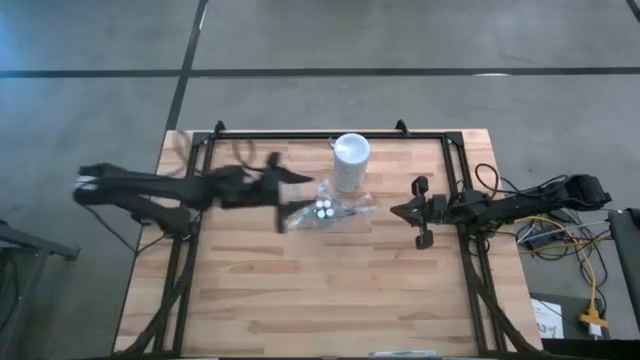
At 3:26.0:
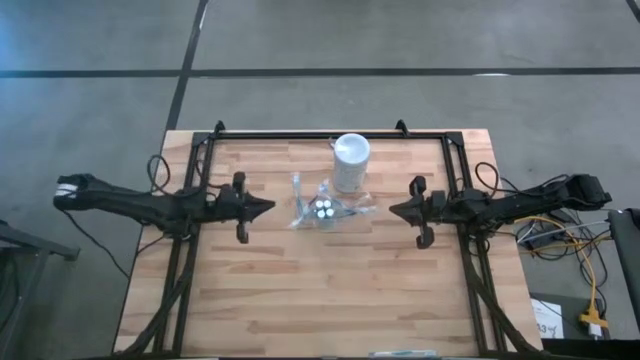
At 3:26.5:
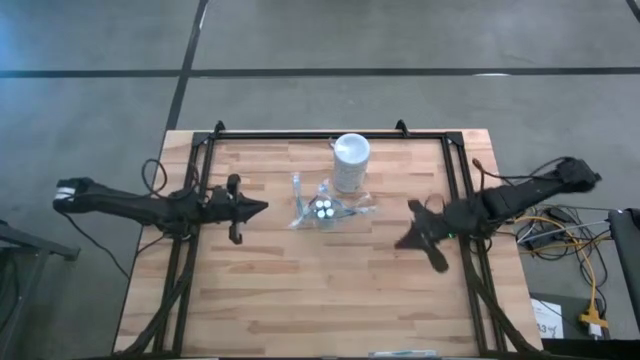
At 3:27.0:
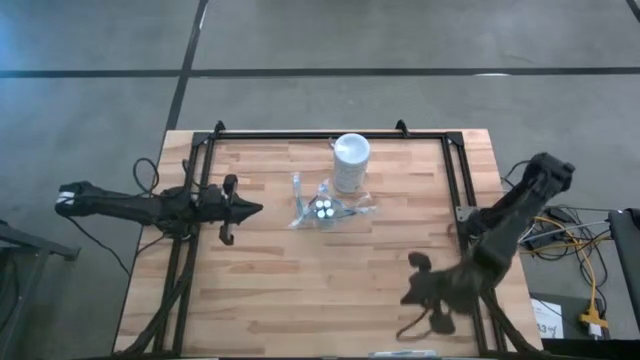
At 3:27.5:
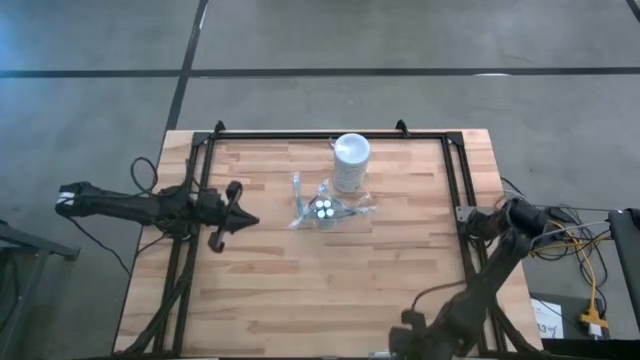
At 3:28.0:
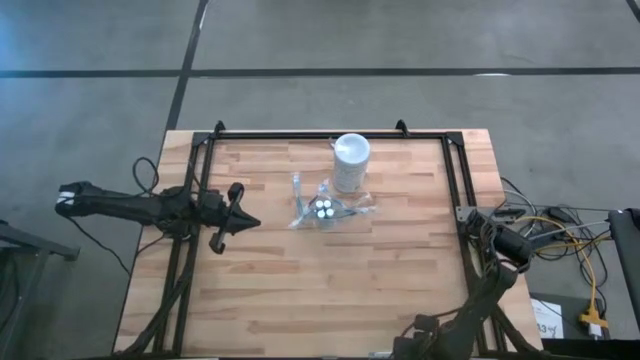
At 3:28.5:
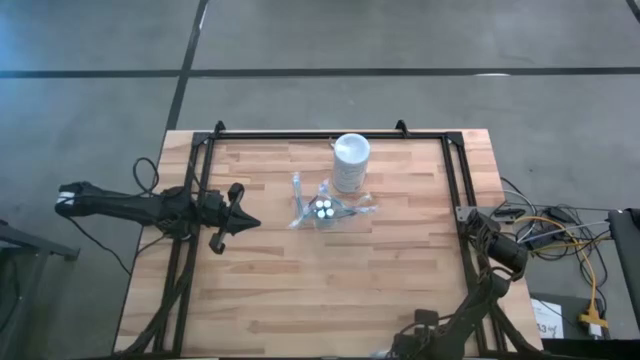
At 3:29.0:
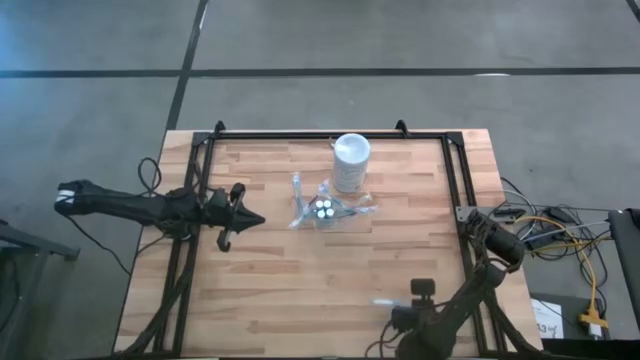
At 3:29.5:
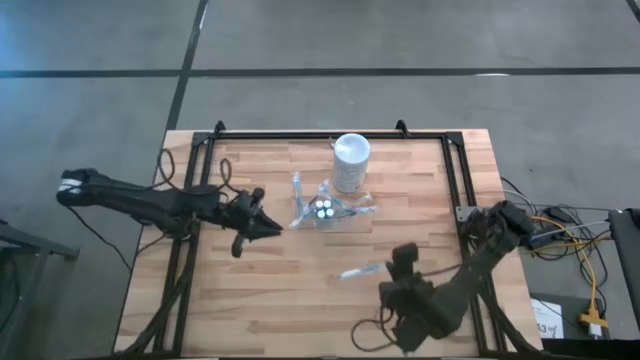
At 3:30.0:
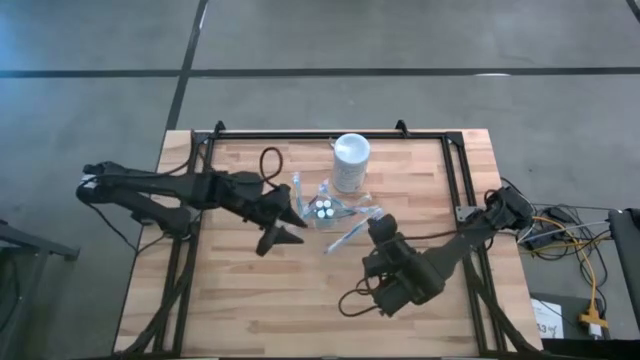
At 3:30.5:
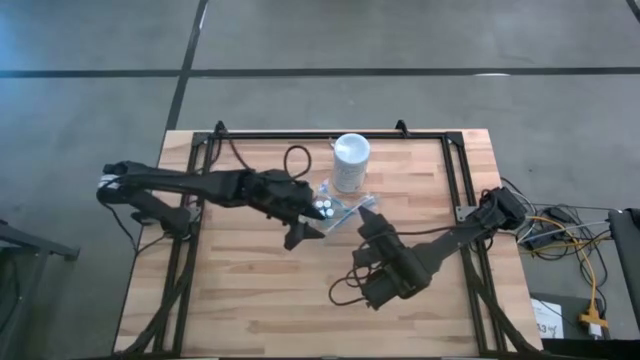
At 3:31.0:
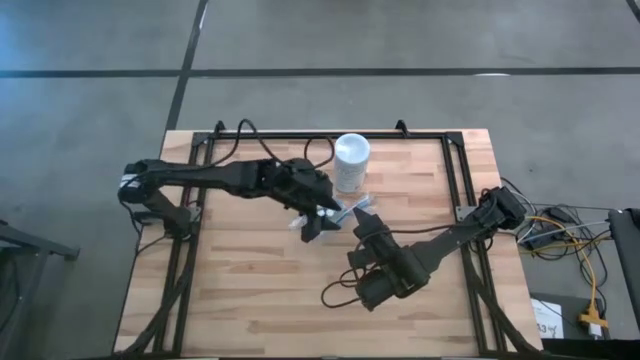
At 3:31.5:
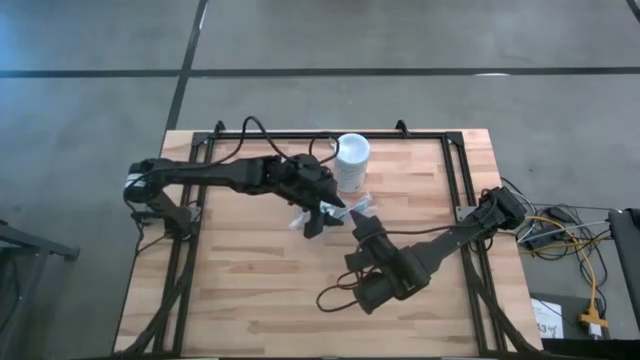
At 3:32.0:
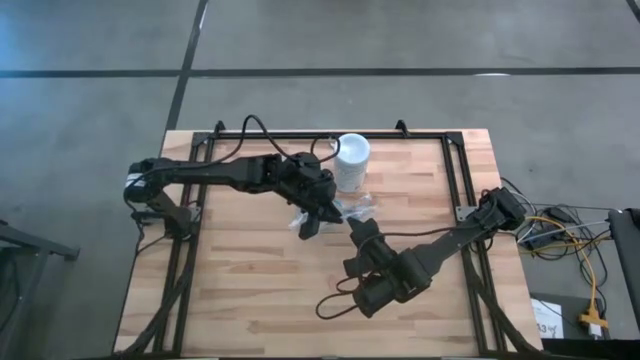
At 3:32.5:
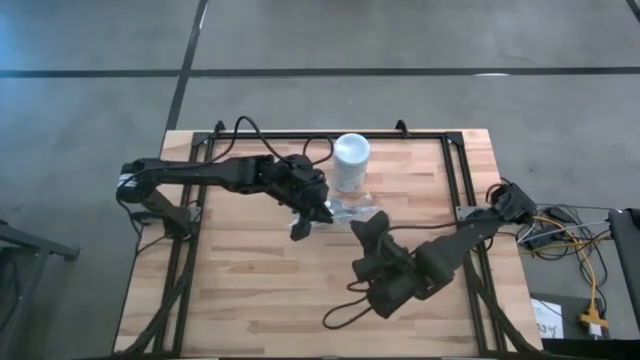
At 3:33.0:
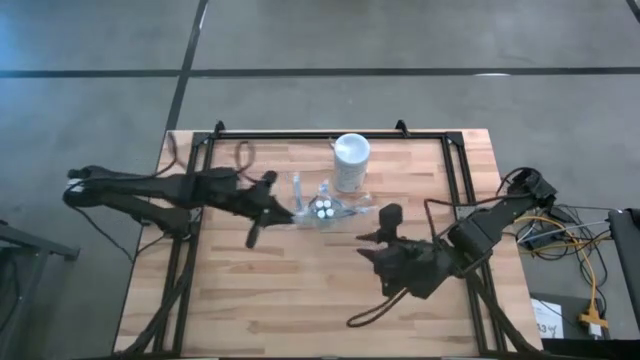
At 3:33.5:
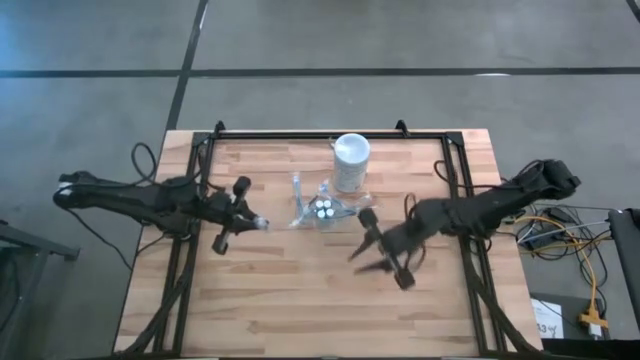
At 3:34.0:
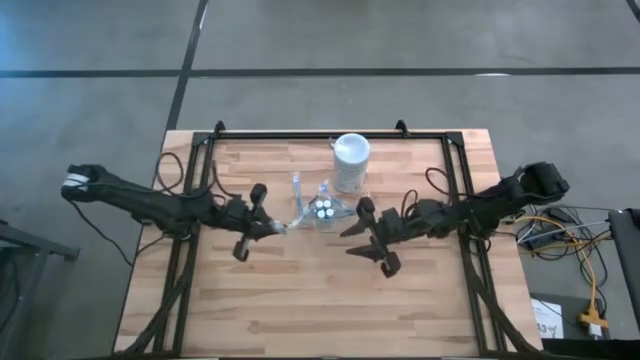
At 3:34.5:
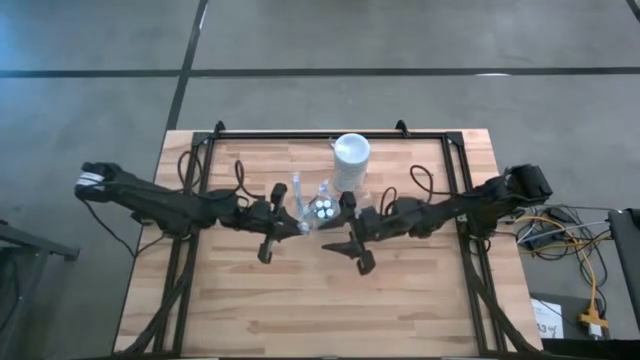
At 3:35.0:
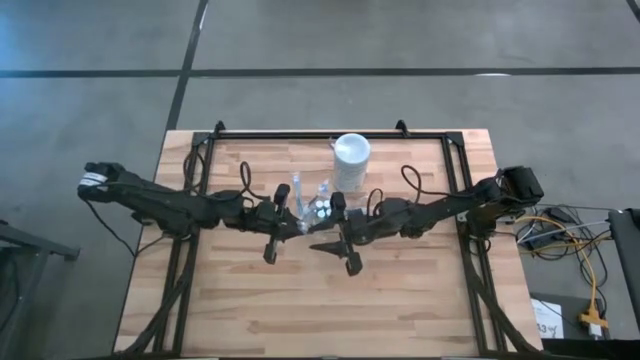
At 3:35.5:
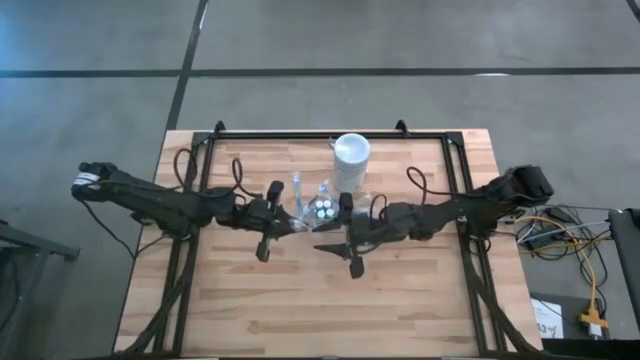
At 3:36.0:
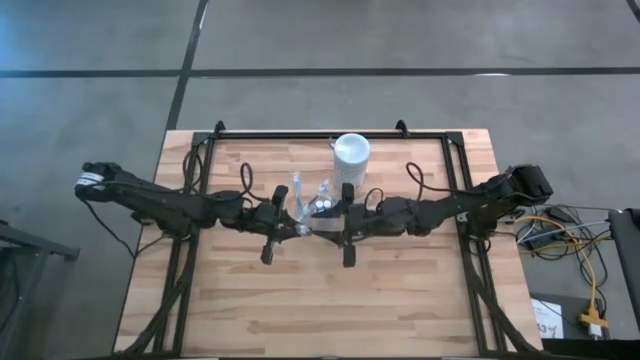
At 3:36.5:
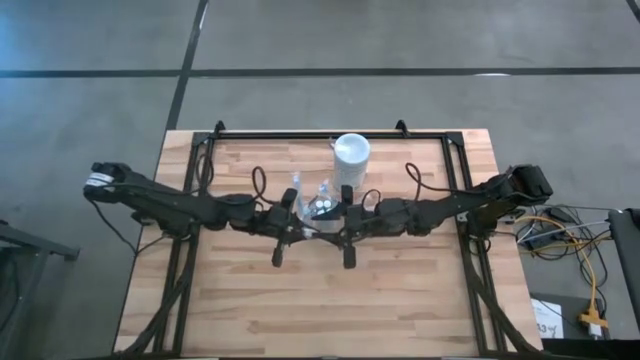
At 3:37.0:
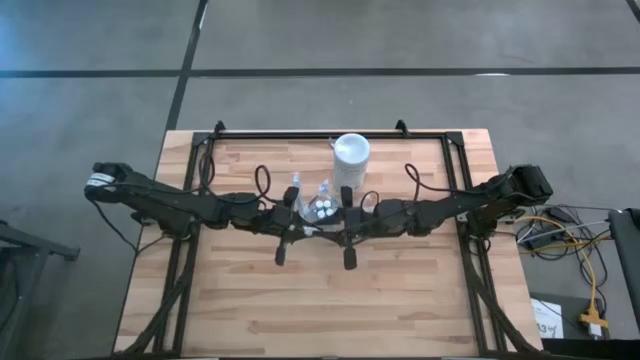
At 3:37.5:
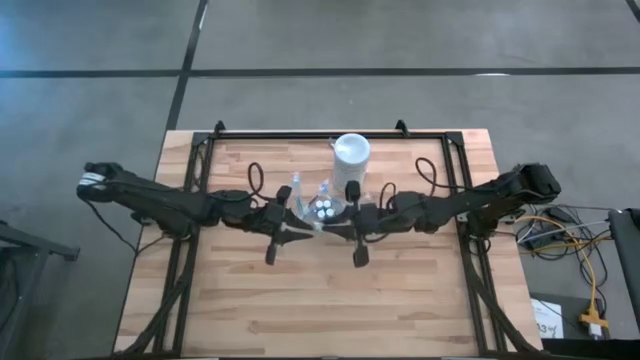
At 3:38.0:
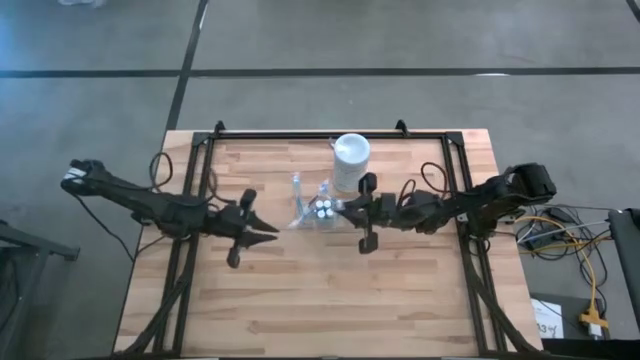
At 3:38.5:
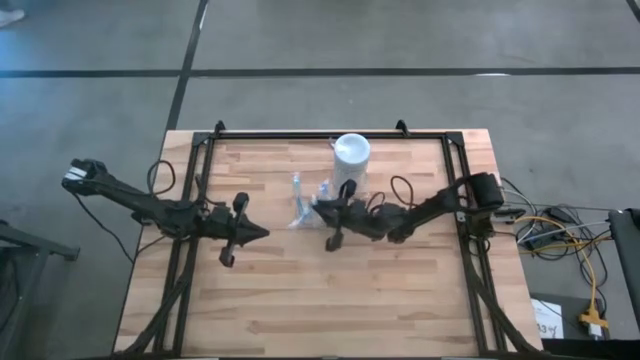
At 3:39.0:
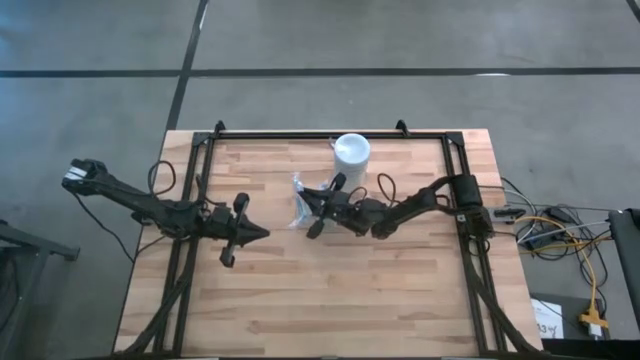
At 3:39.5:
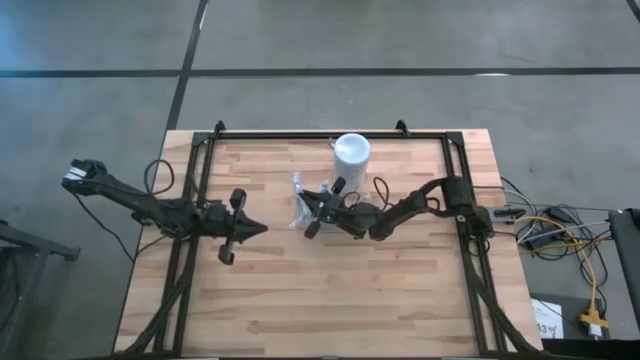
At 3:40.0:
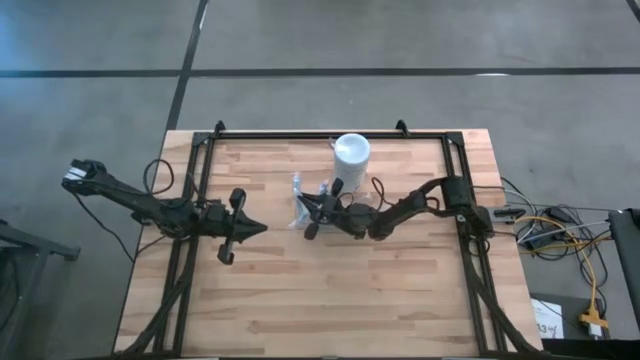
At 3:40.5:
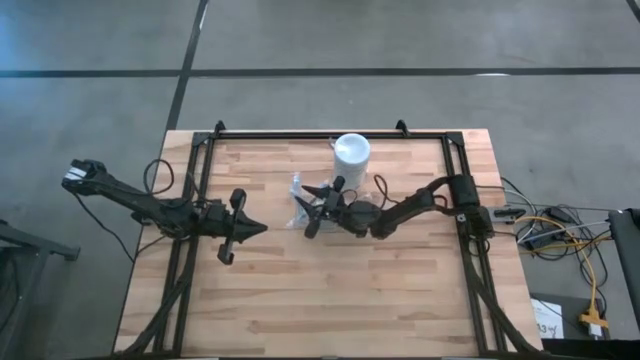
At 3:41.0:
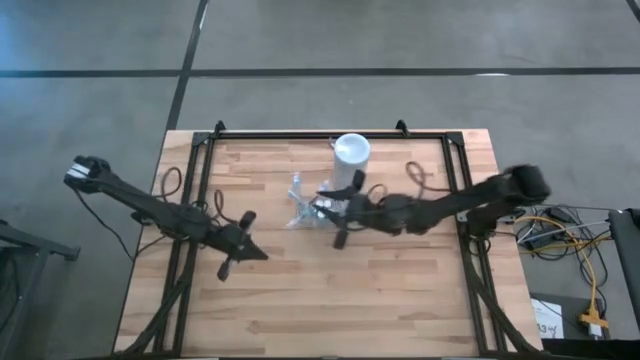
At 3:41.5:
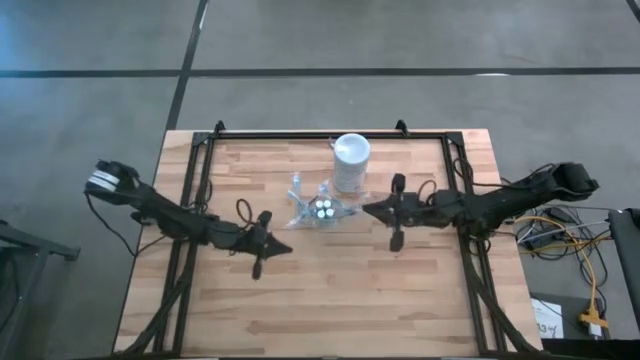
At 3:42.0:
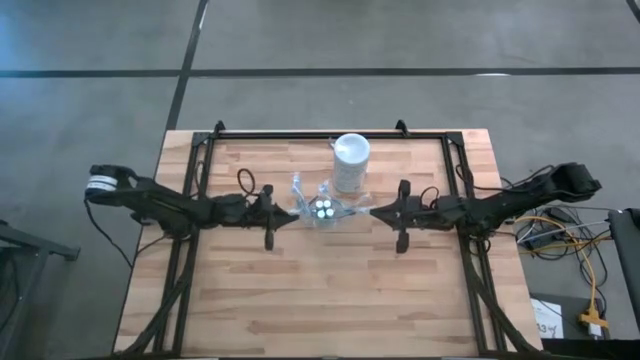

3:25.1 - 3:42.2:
Task: Pick & Place toothbrushing station
Put the blue toothbrush into the transparent organizer
